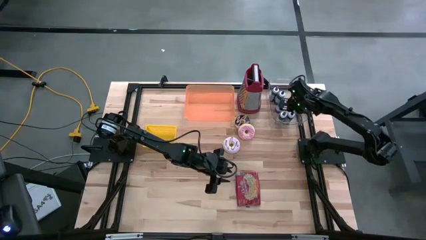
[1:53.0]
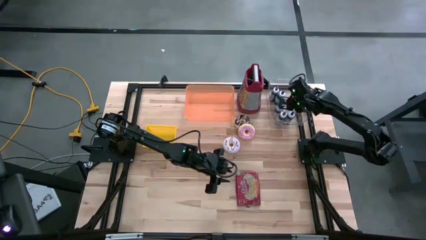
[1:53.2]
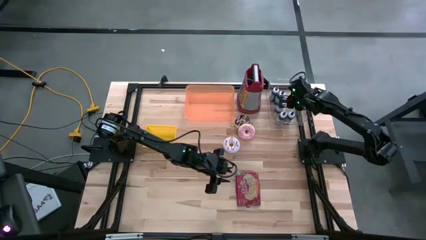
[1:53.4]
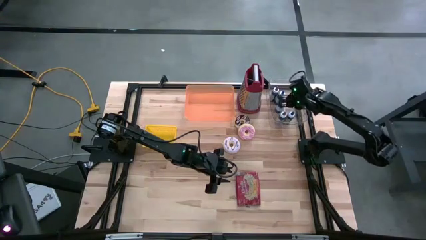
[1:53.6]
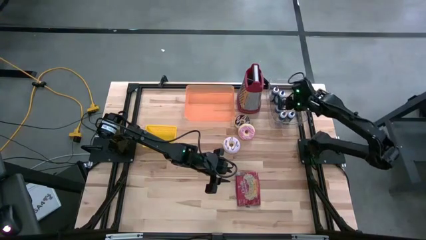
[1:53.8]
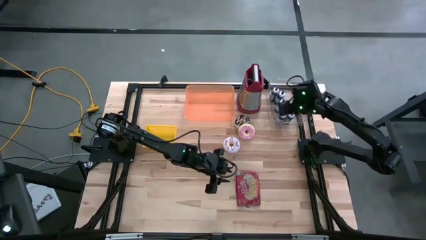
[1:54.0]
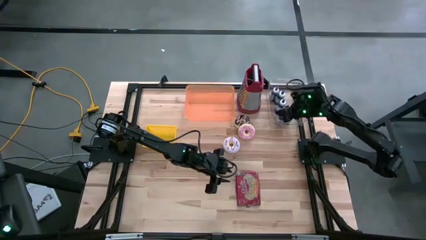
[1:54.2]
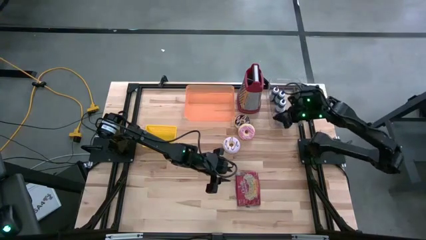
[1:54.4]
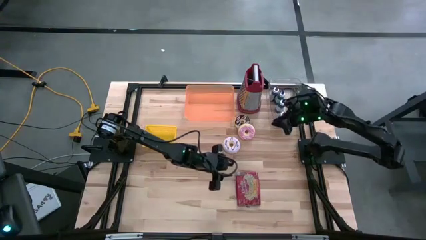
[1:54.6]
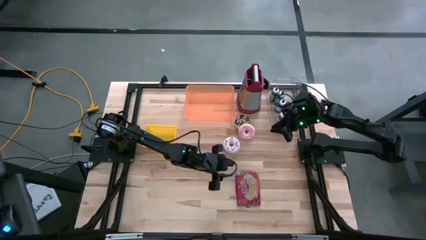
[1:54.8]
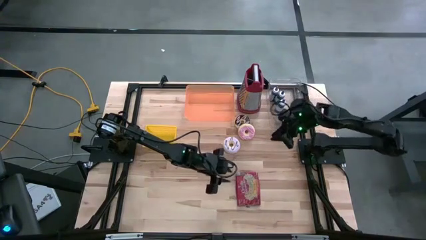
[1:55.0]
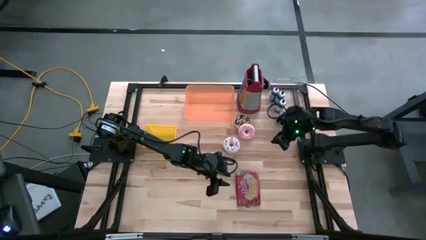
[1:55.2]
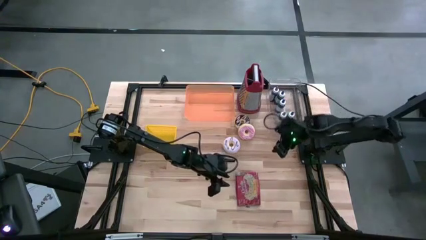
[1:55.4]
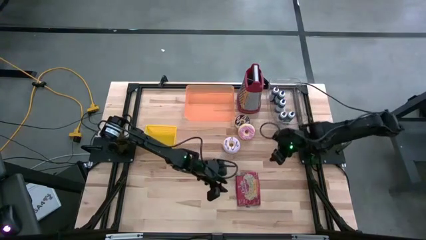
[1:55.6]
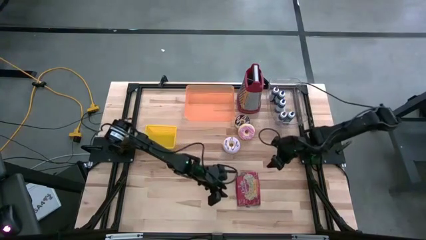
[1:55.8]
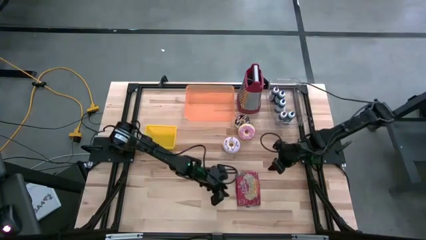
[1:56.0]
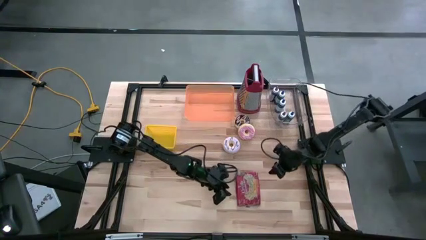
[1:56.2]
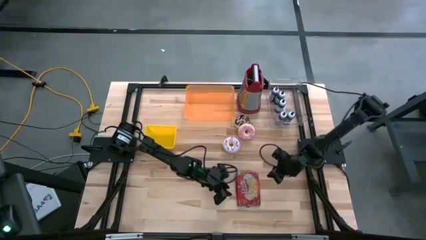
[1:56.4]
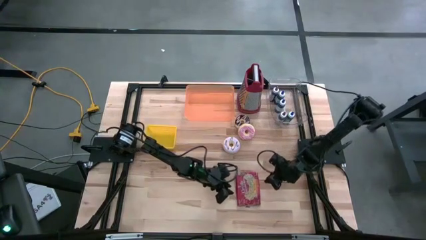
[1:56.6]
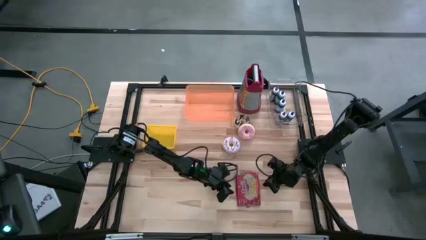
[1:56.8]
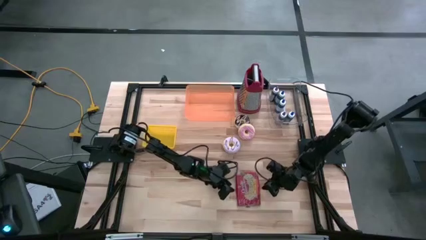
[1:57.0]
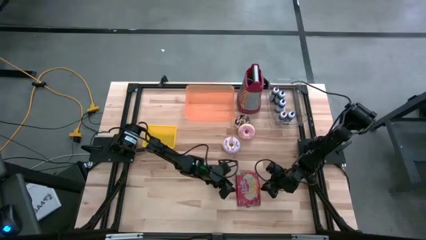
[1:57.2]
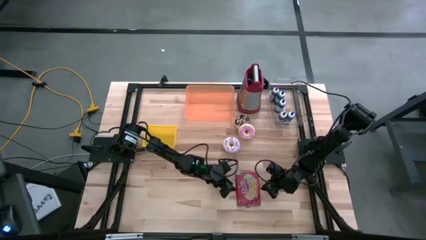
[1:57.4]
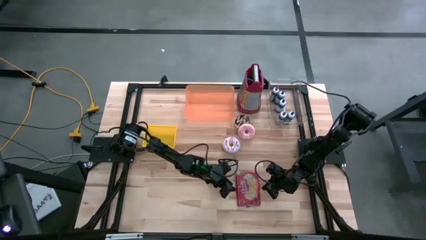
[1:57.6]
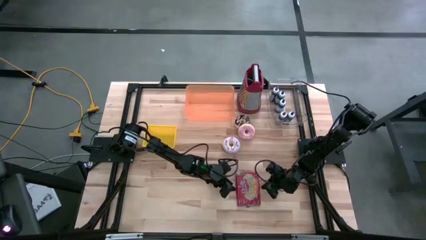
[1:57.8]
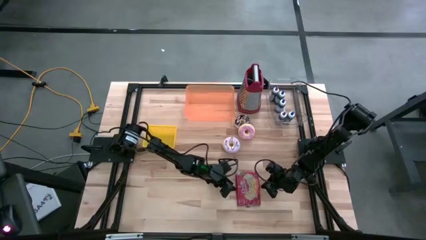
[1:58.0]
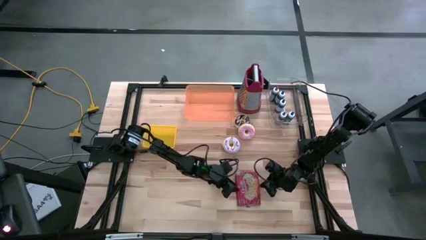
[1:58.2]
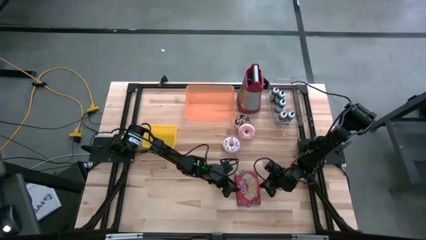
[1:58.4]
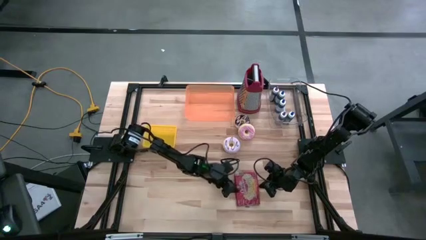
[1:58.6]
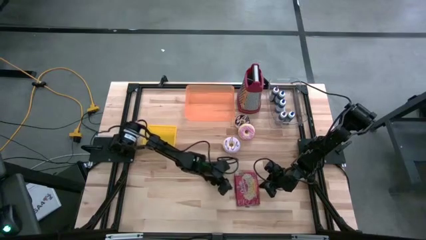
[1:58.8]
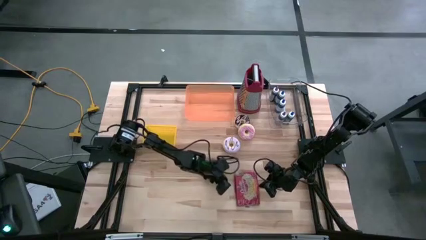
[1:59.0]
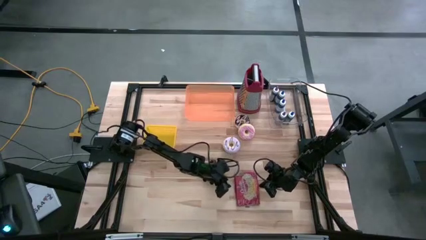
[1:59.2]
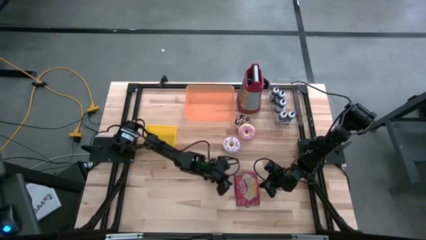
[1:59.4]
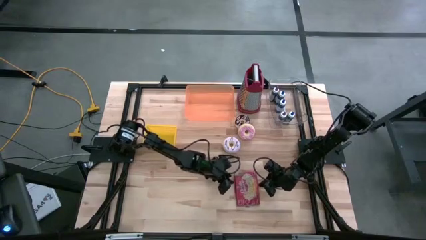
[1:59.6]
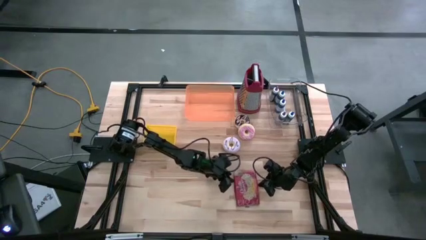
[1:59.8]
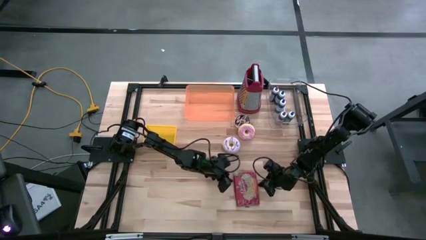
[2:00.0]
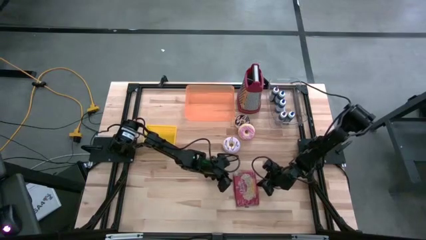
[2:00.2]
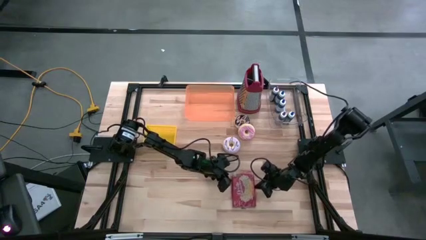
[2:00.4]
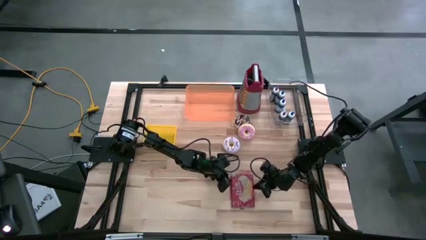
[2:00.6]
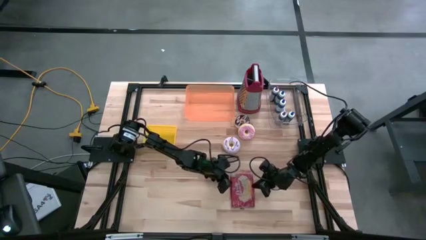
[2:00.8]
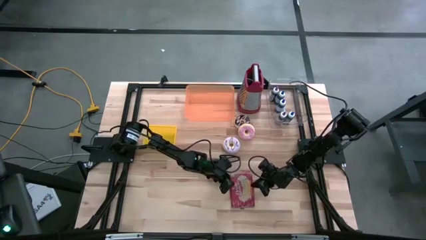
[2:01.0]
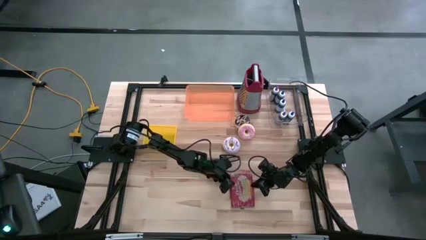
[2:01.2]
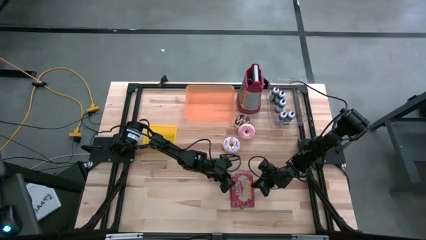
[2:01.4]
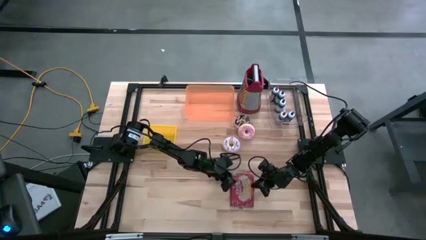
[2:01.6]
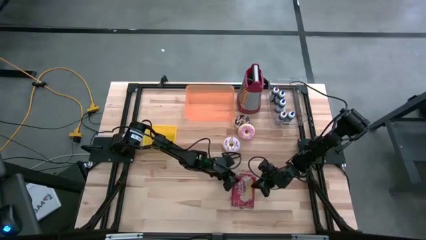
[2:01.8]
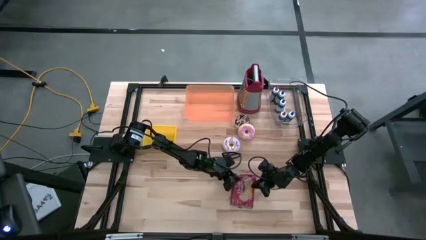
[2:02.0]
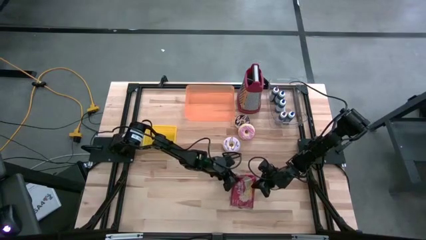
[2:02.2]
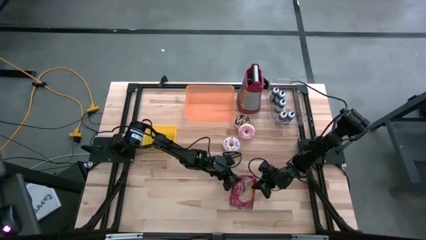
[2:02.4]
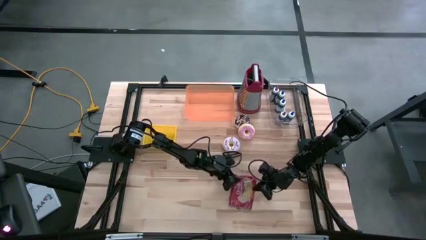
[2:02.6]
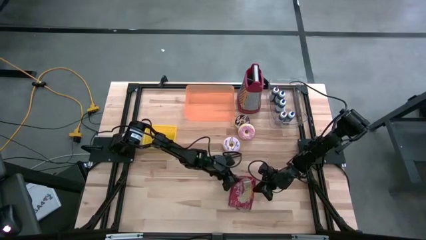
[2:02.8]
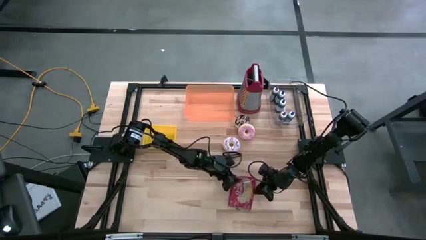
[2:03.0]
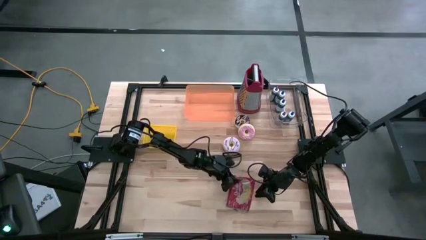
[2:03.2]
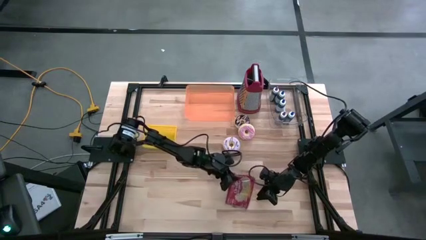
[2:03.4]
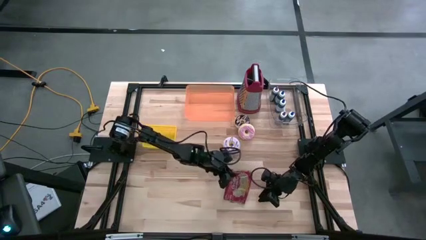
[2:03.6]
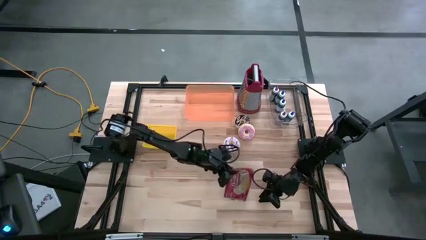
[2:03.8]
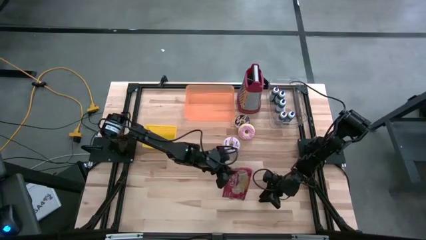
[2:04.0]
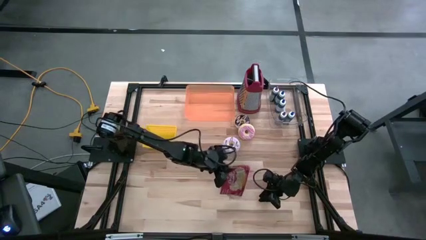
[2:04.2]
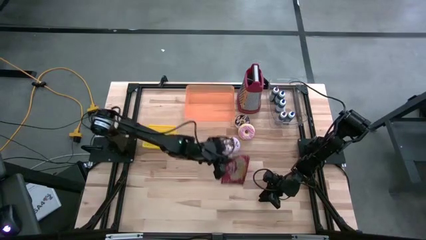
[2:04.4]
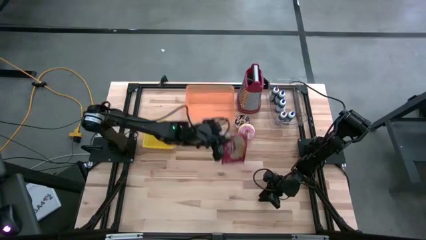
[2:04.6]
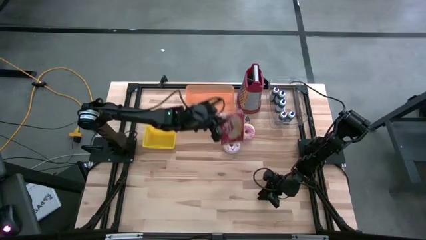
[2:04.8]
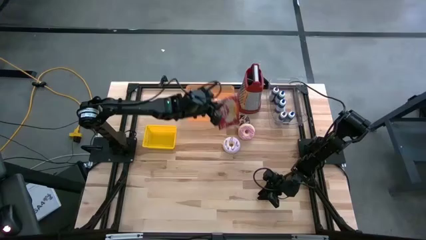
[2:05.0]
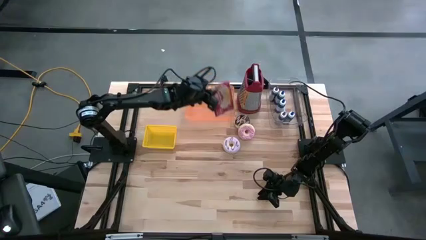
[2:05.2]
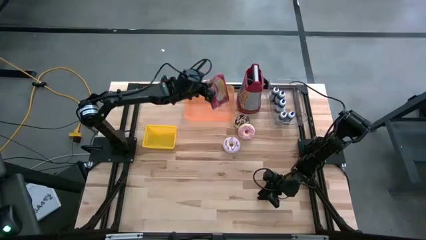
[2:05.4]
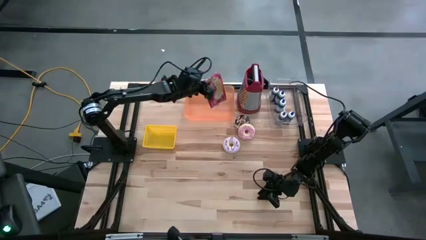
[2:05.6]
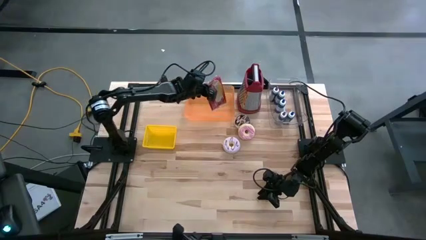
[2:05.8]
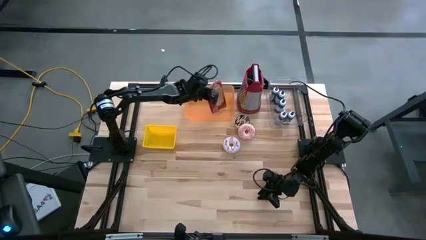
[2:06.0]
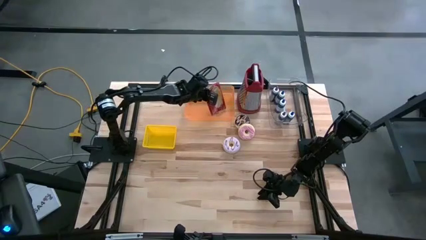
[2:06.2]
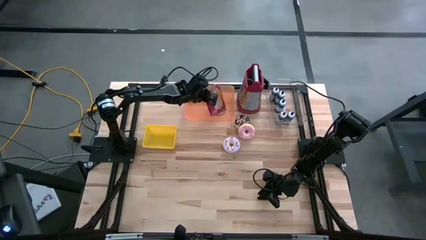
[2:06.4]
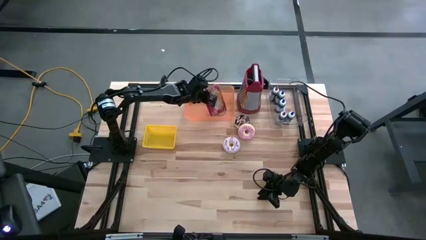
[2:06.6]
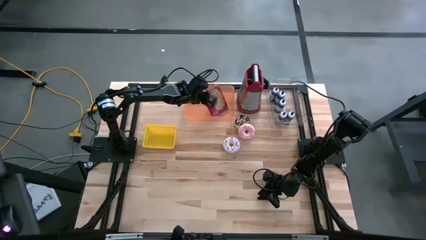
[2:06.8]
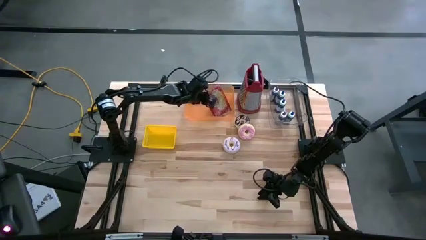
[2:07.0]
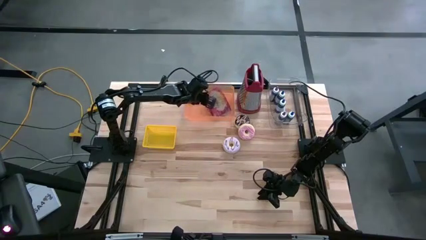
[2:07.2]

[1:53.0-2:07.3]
Task: Pick & Place Food Item
Put the popcorn bag into the orange bin

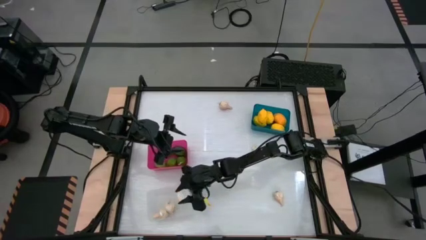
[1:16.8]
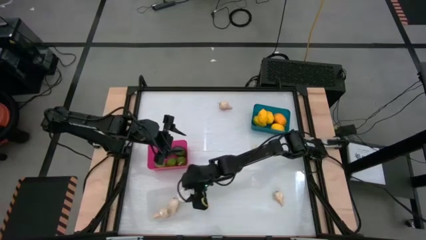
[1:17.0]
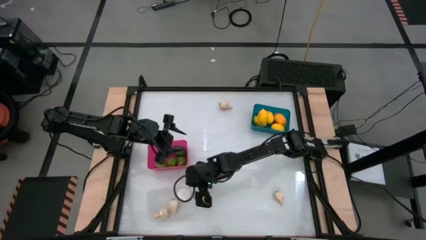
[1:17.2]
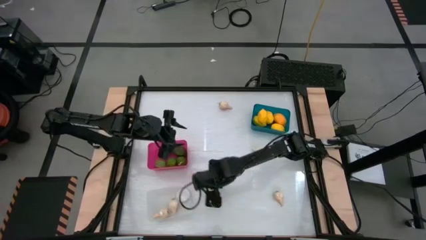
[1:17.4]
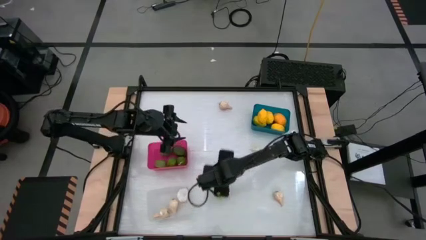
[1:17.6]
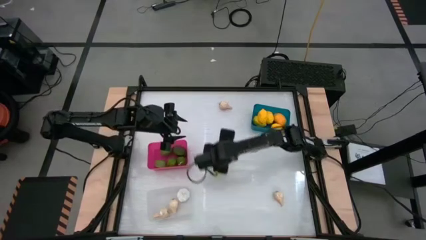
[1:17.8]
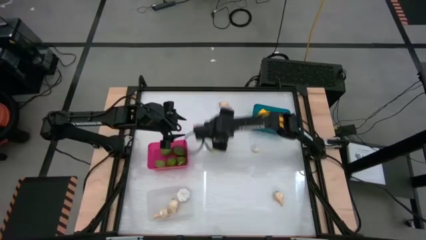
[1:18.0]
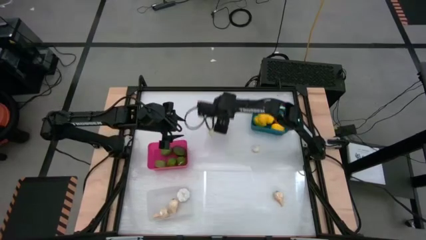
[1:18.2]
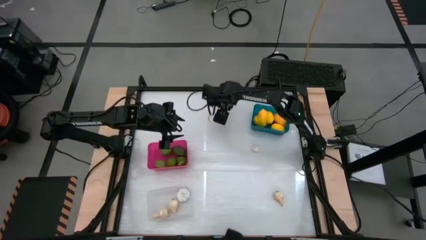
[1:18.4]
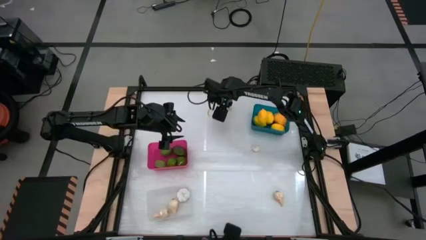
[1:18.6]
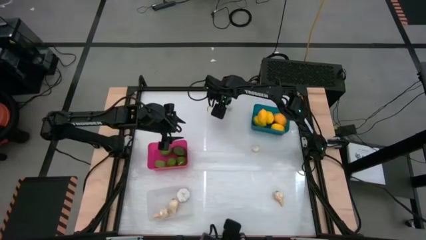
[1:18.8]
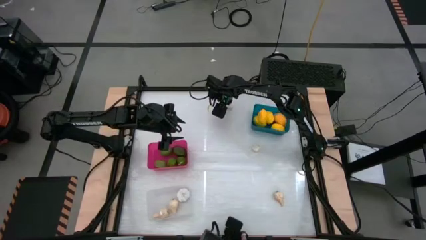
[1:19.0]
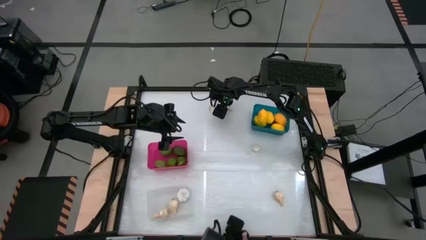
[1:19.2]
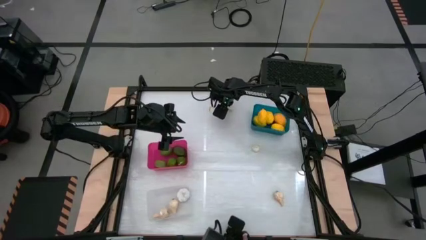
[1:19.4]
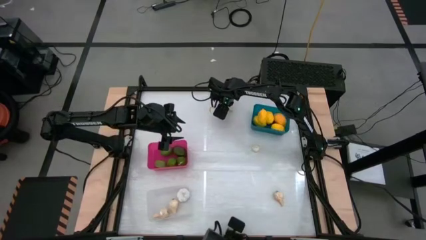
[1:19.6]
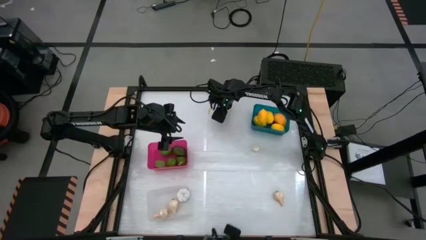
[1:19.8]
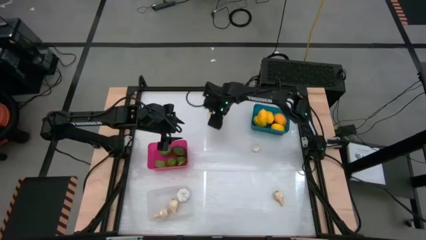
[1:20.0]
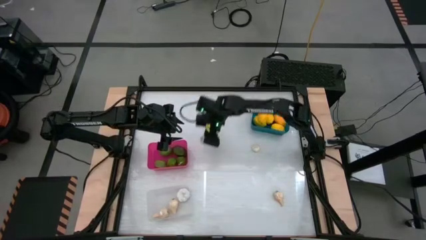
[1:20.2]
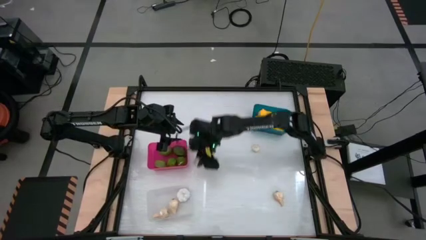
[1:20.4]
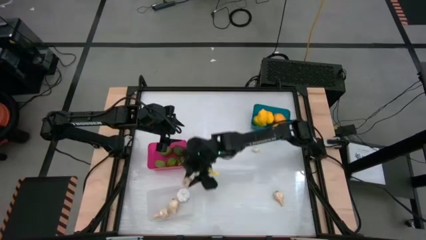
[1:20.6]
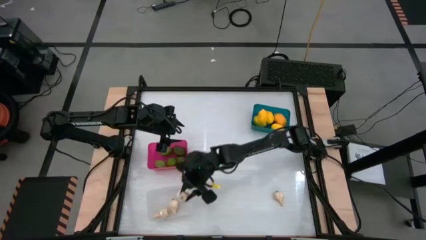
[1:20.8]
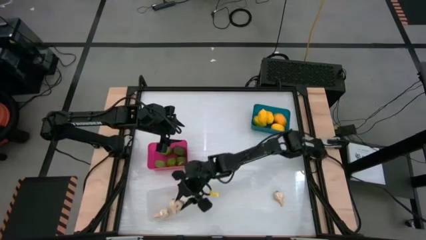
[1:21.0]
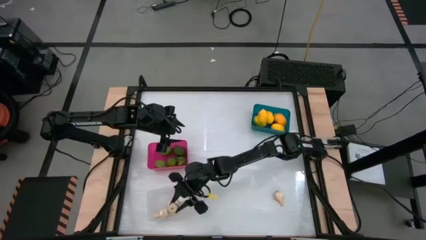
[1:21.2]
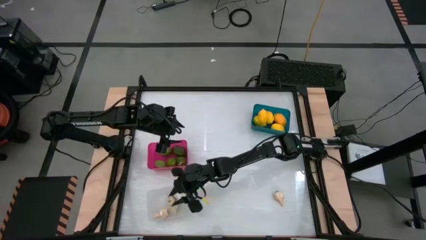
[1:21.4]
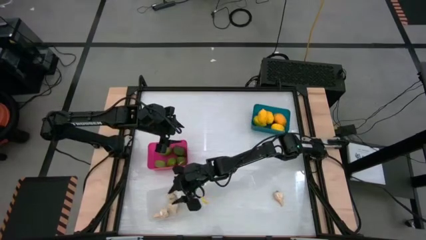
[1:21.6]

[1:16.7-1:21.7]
Task: Sort produce into baskets
Put the garlic into the white bin
